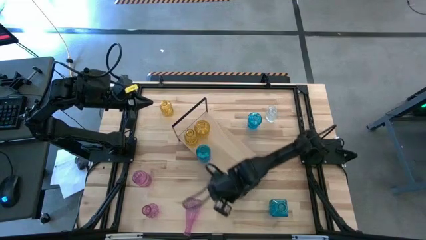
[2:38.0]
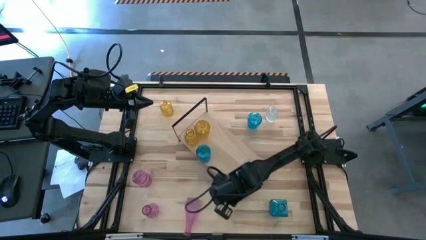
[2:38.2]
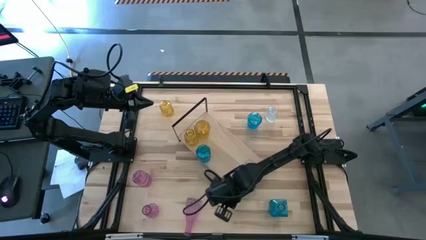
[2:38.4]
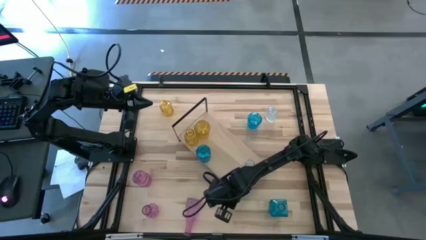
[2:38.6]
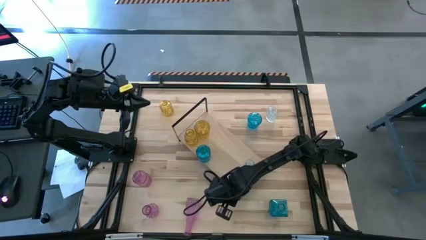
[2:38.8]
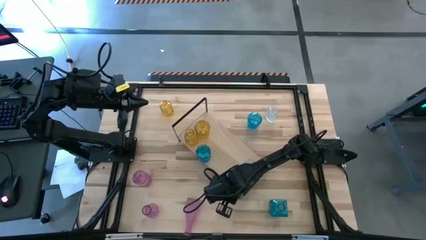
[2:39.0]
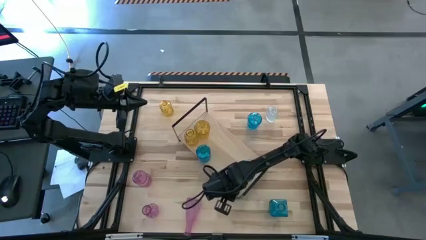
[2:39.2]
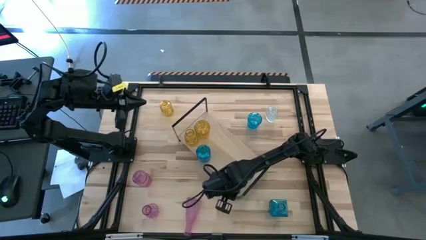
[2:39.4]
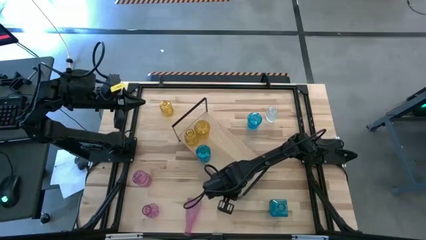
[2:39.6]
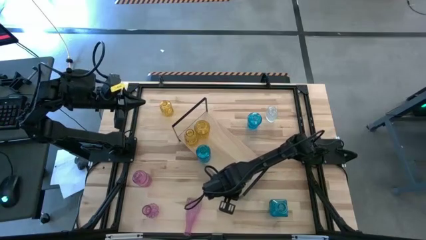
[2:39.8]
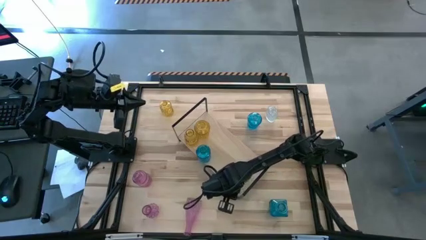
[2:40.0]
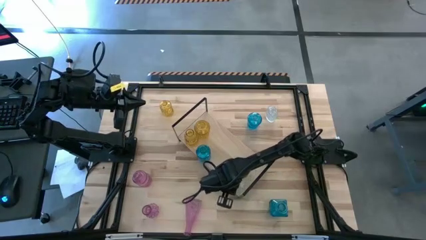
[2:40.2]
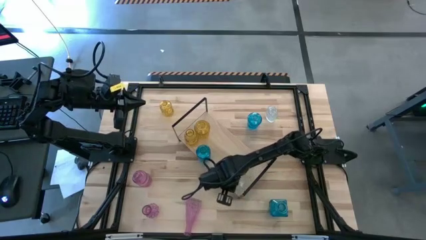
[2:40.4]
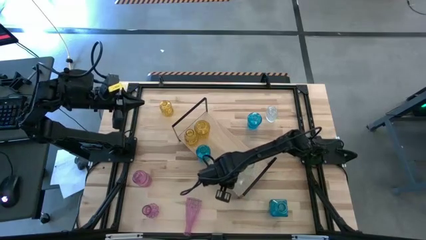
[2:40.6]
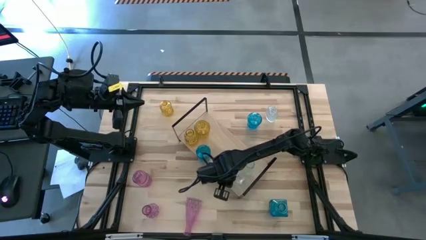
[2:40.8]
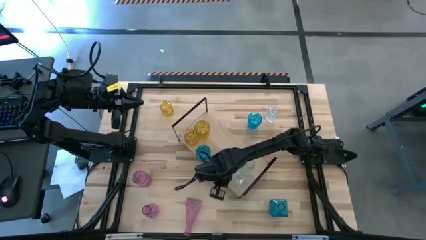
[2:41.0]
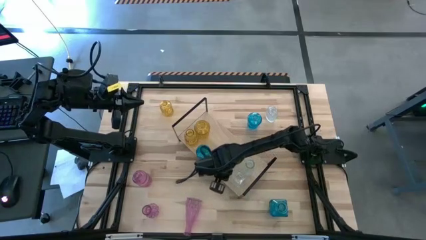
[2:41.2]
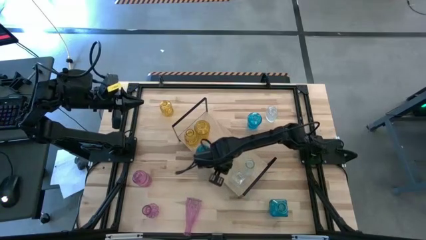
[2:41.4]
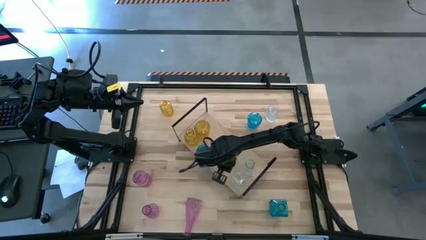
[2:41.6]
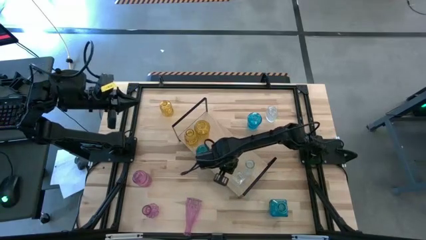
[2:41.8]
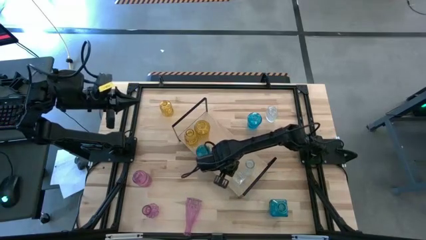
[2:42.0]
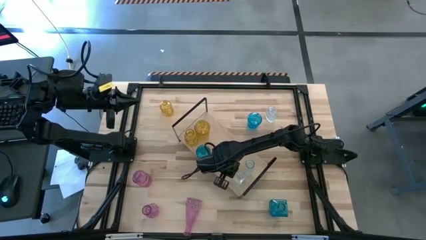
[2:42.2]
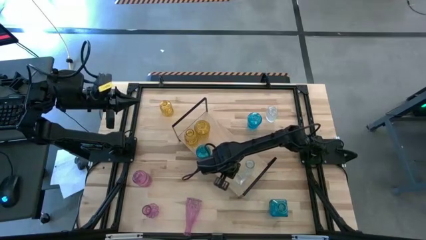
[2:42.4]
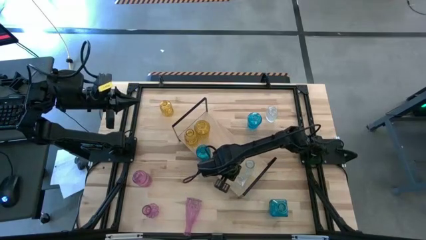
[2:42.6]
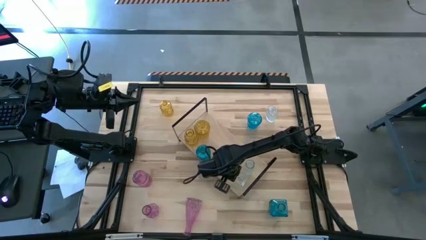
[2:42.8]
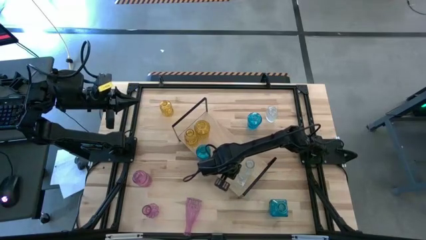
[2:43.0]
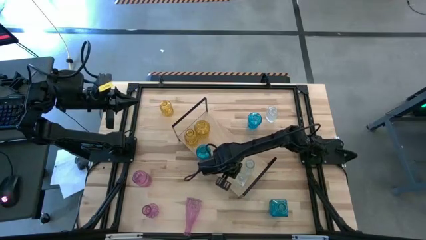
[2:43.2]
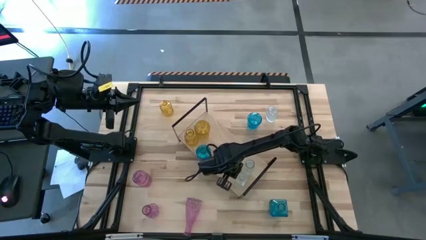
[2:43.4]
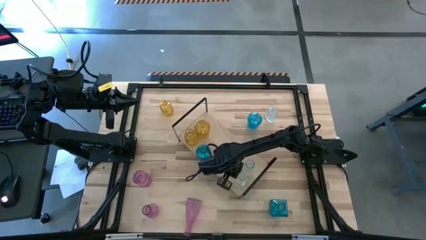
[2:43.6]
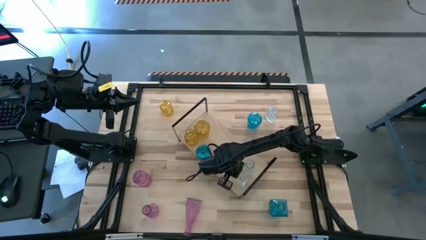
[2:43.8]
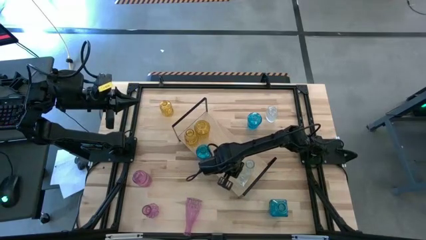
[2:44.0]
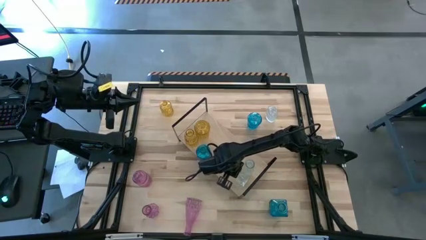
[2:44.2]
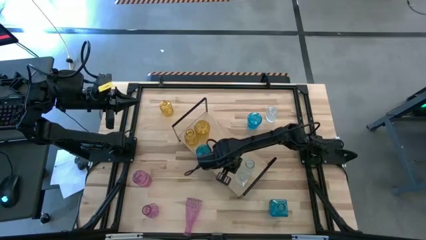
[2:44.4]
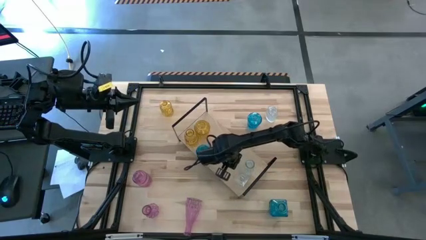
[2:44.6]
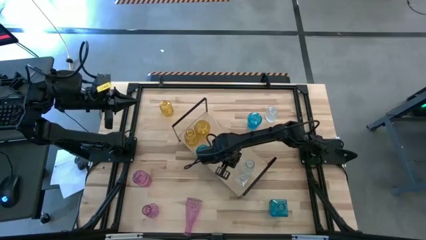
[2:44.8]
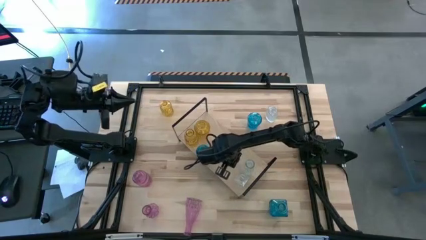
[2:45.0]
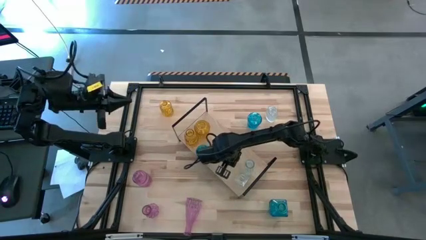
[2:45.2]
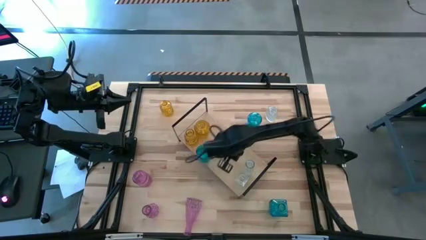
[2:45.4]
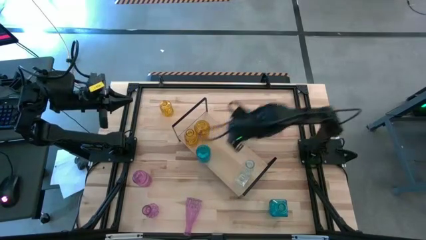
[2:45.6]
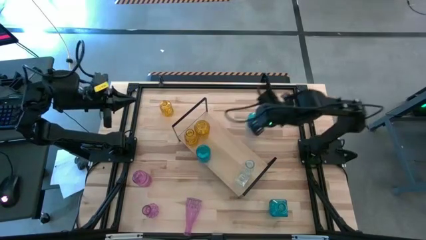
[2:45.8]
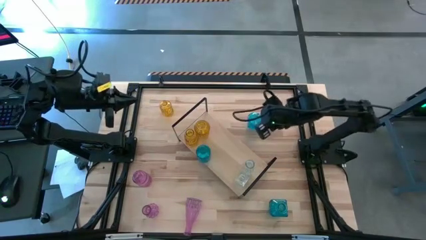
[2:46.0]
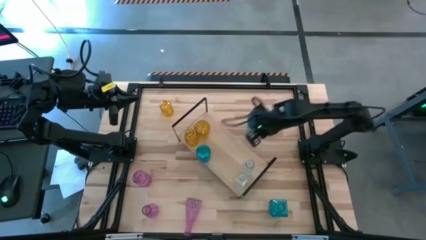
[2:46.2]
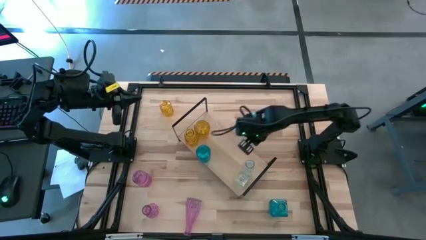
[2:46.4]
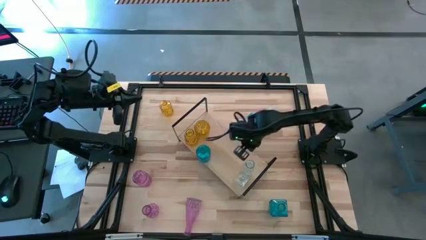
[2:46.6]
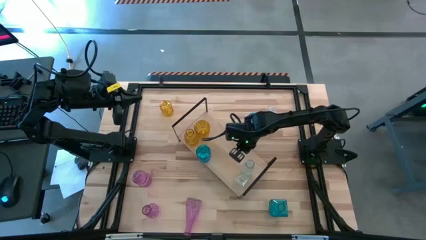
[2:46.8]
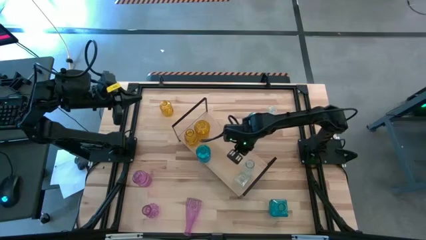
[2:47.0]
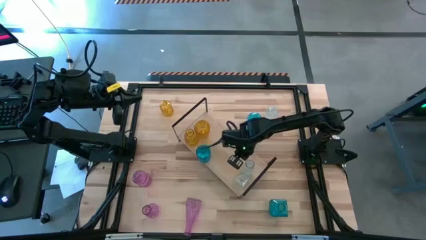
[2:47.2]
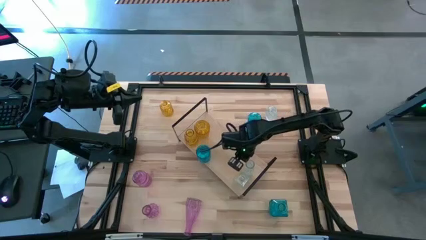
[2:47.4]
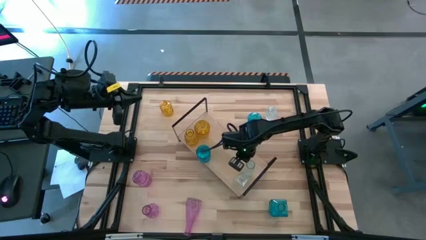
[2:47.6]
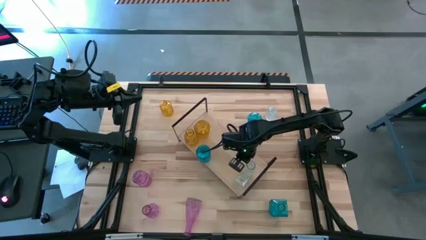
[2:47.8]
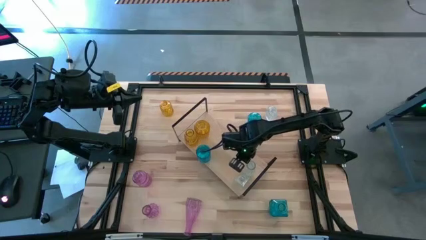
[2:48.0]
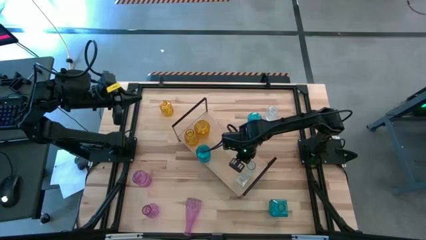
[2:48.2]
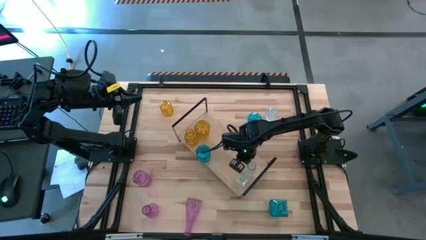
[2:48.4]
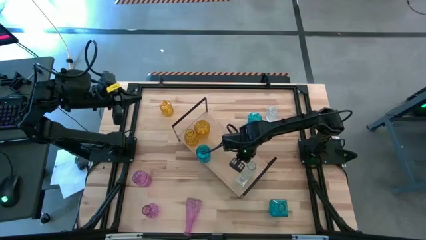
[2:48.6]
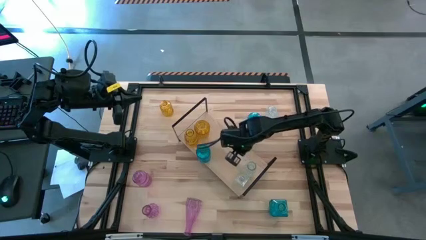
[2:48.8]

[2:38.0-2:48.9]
Task: sort vases onto shelf
Adjust the crystal vases on the shelf
